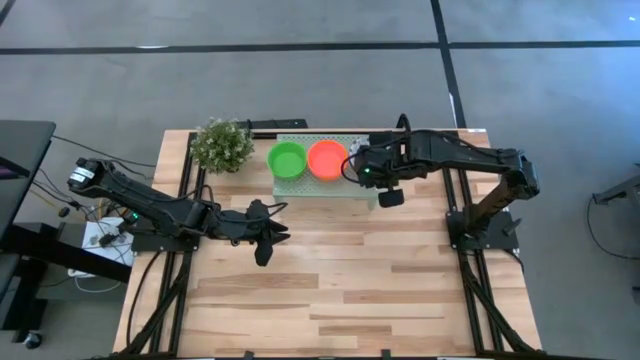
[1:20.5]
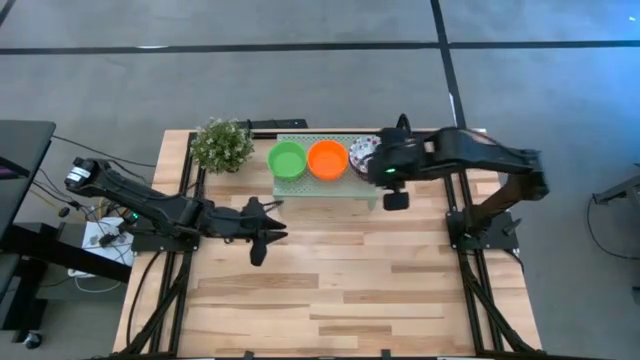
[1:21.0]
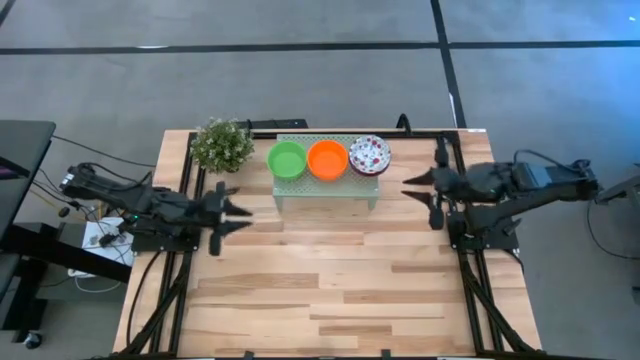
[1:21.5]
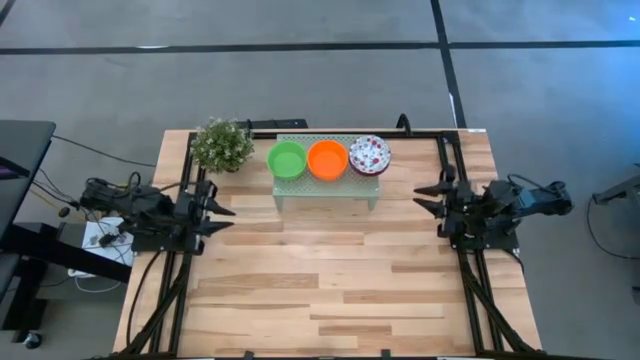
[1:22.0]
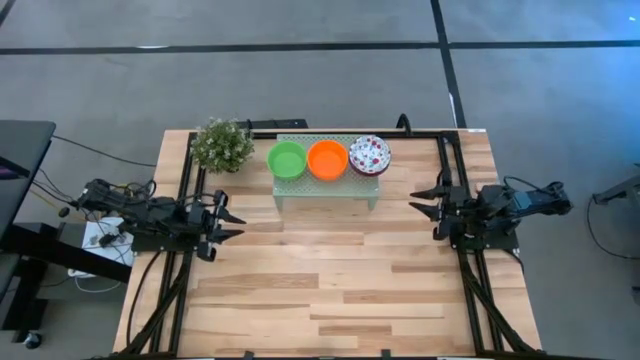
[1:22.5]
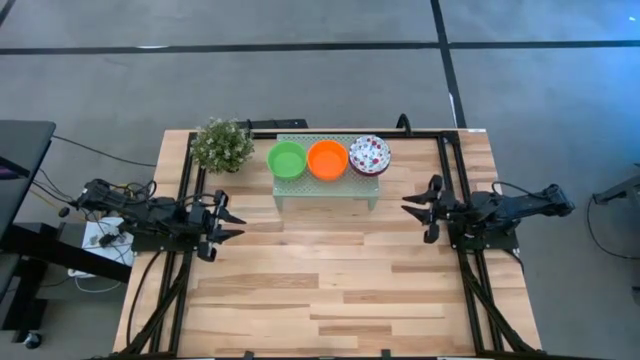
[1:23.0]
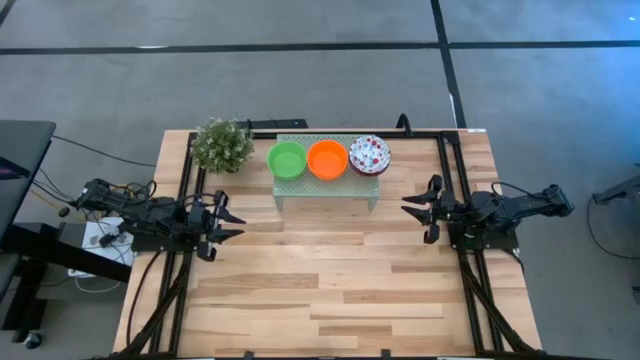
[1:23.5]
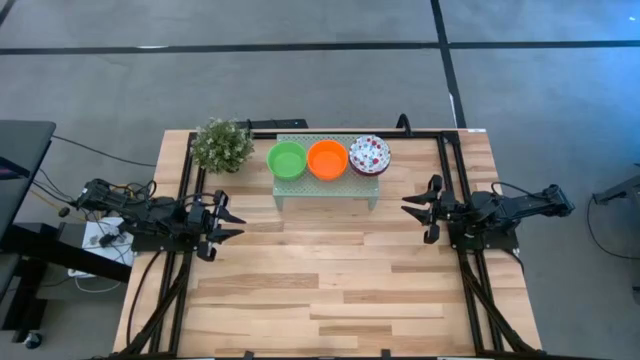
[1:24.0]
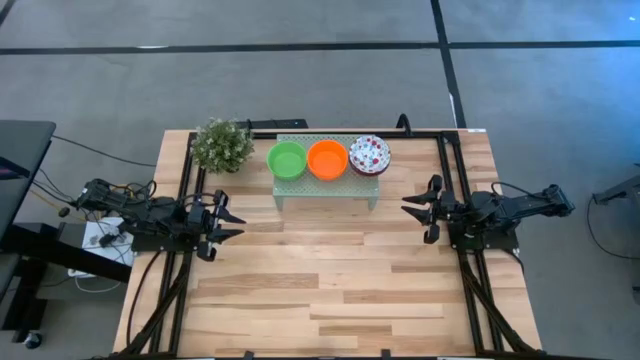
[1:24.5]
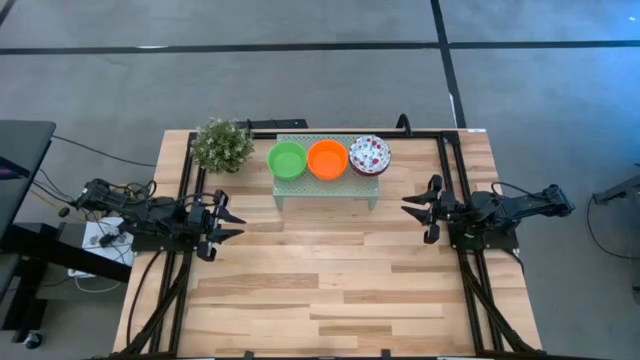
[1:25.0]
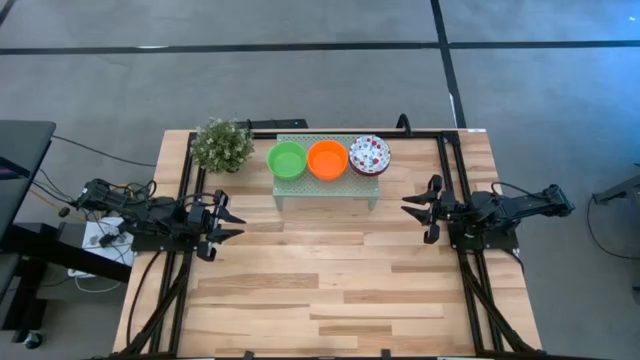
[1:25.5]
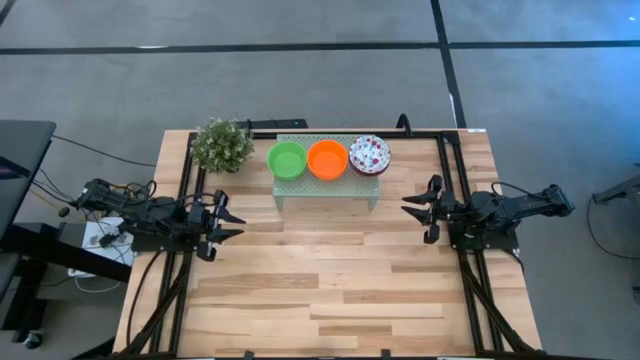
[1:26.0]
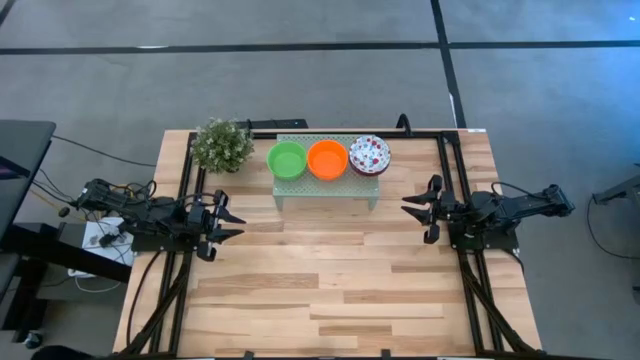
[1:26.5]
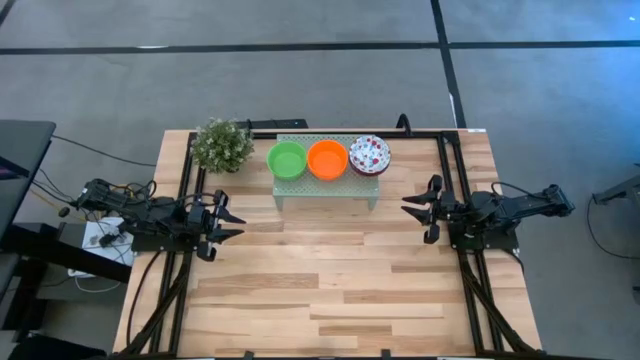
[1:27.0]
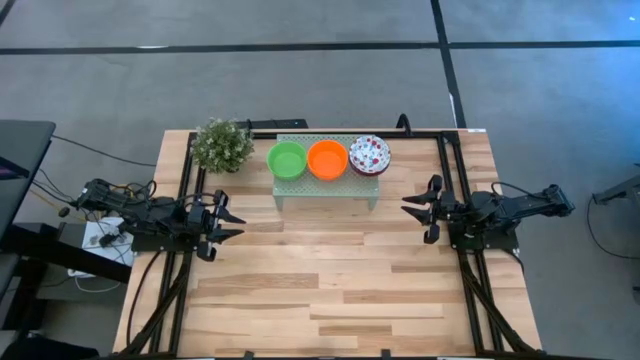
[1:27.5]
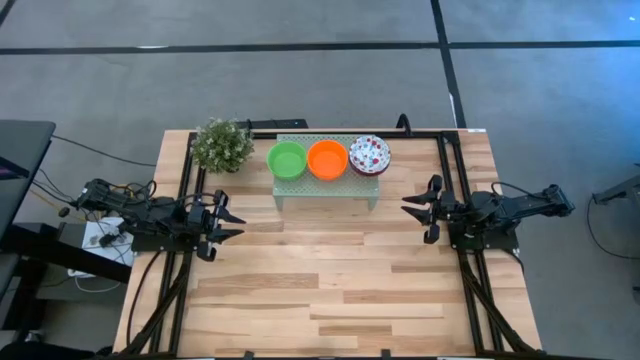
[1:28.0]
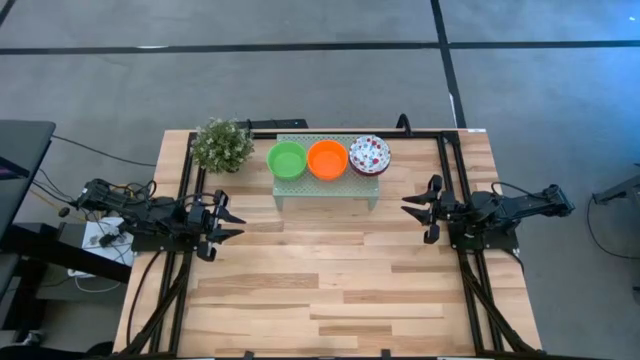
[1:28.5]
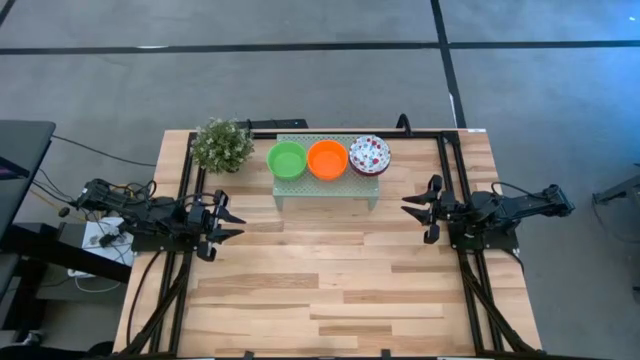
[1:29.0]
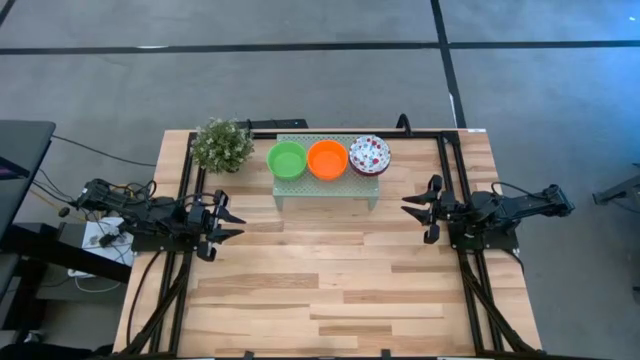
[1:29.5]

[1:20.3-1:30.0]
Task: Pick & Place Mini bowls
Return to Home Position

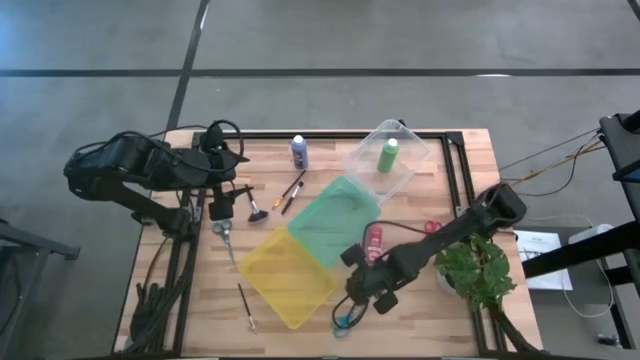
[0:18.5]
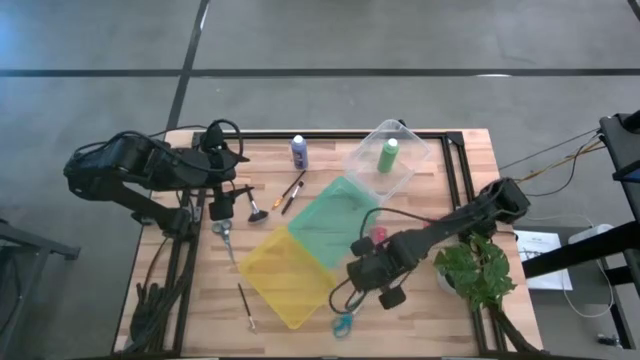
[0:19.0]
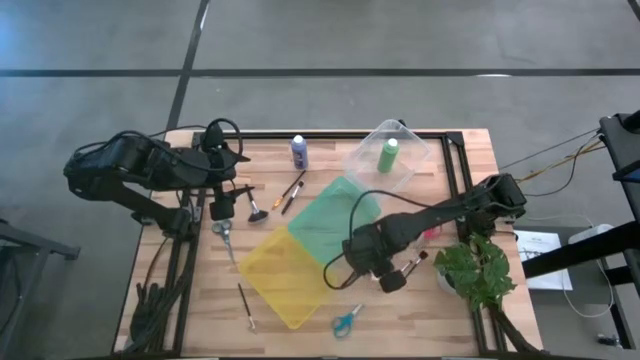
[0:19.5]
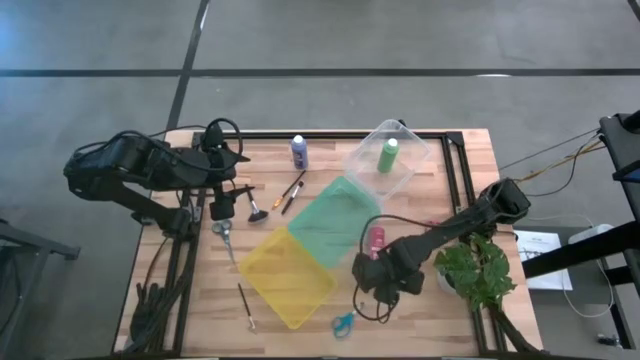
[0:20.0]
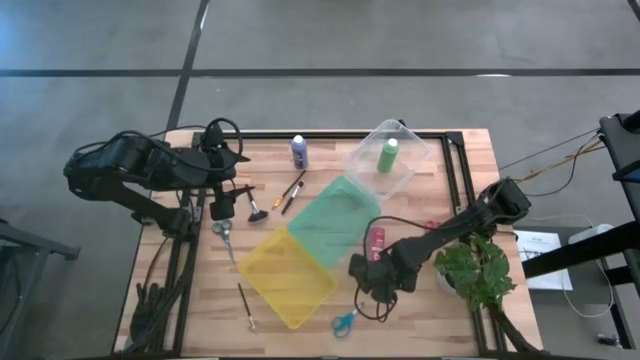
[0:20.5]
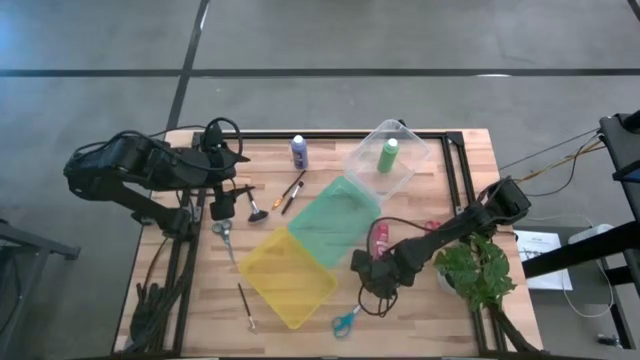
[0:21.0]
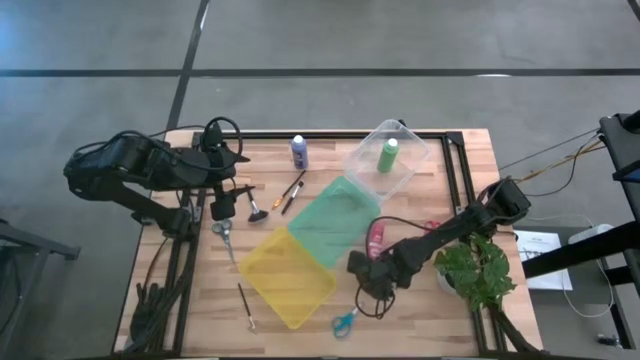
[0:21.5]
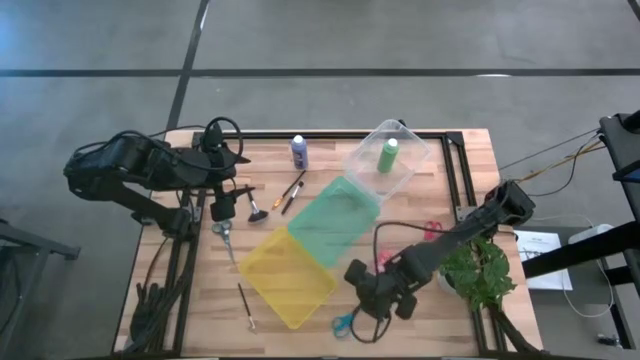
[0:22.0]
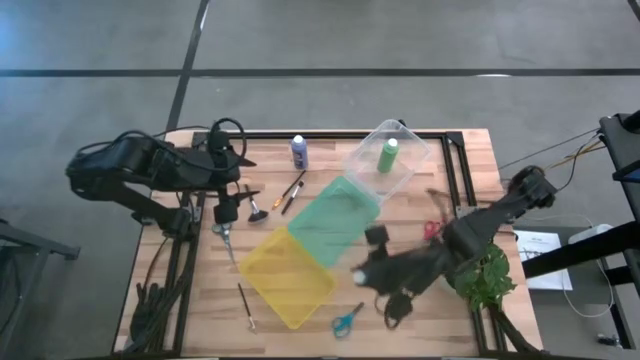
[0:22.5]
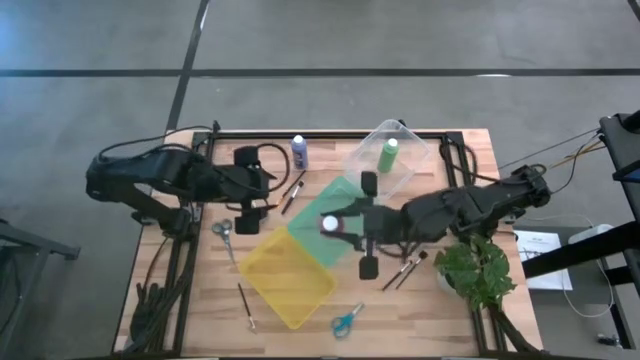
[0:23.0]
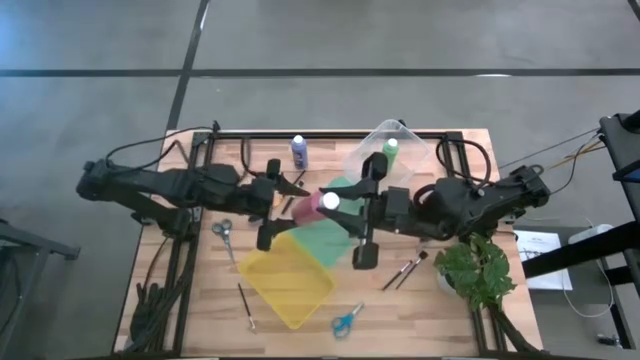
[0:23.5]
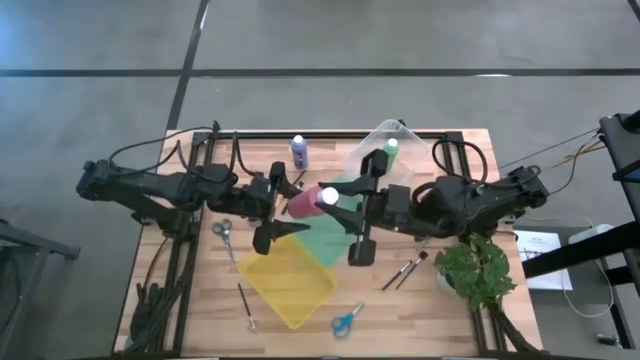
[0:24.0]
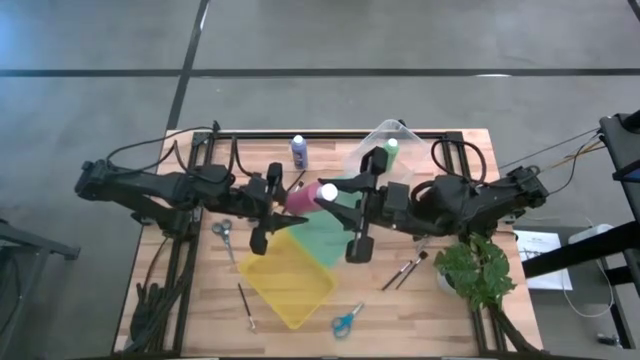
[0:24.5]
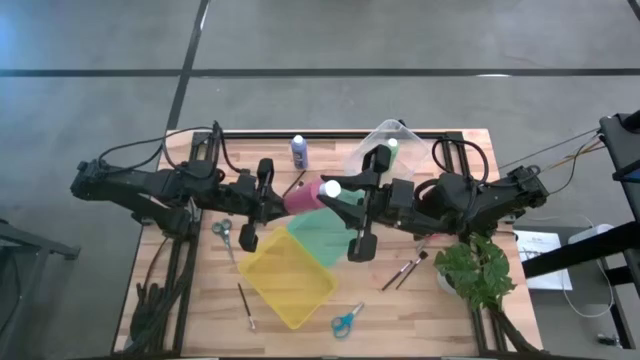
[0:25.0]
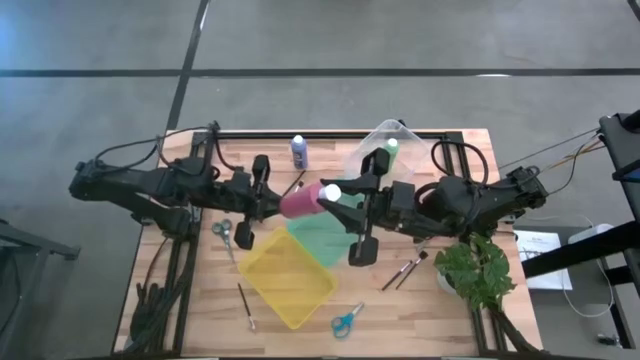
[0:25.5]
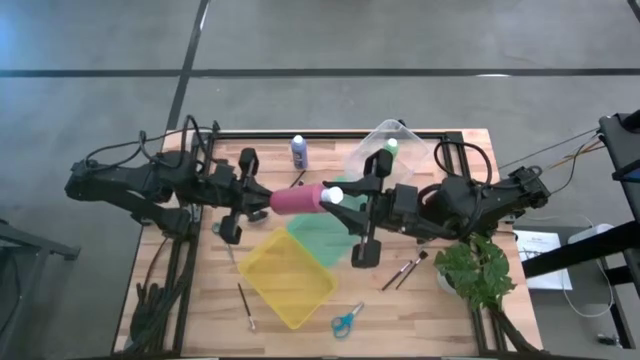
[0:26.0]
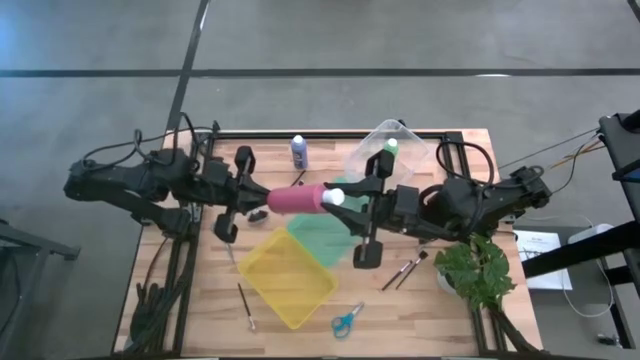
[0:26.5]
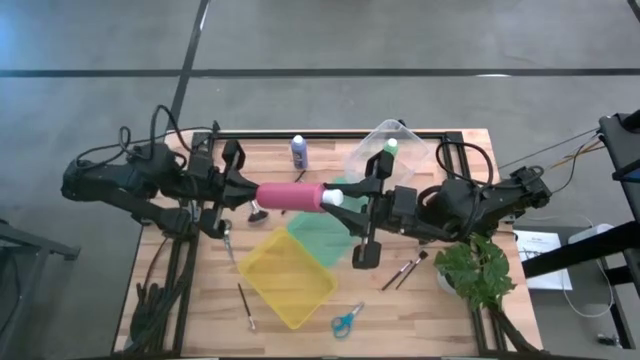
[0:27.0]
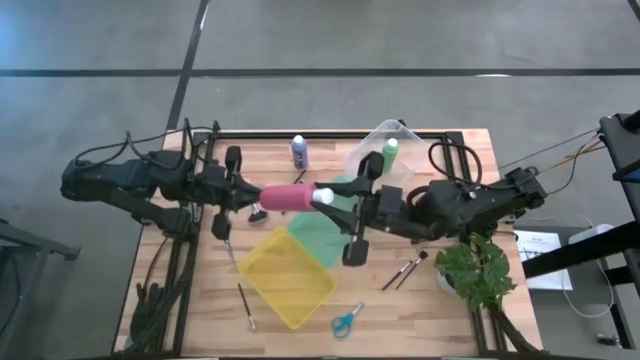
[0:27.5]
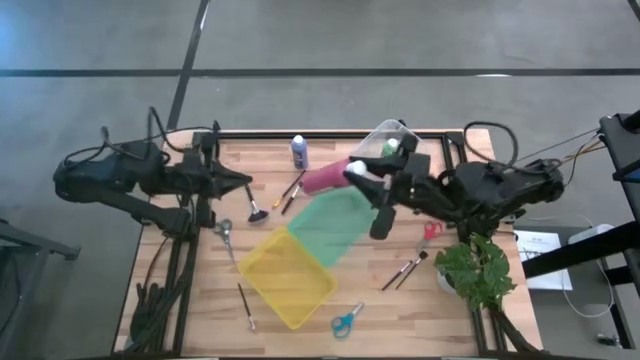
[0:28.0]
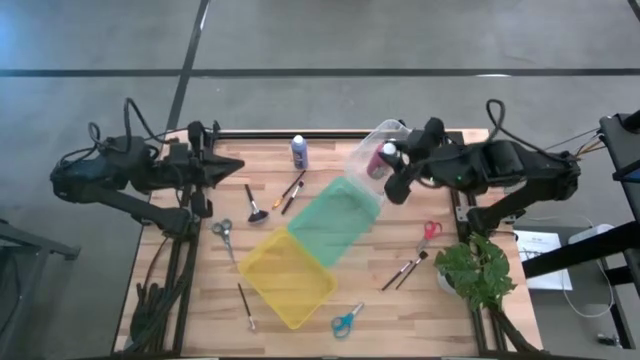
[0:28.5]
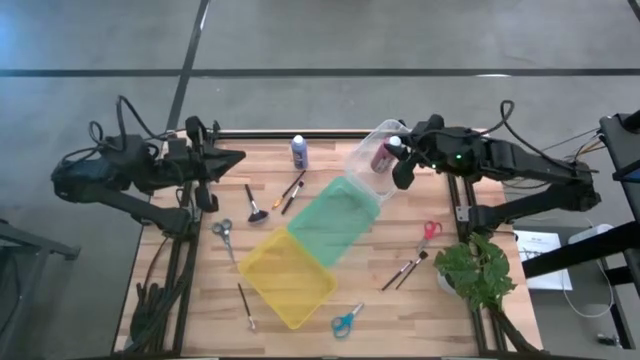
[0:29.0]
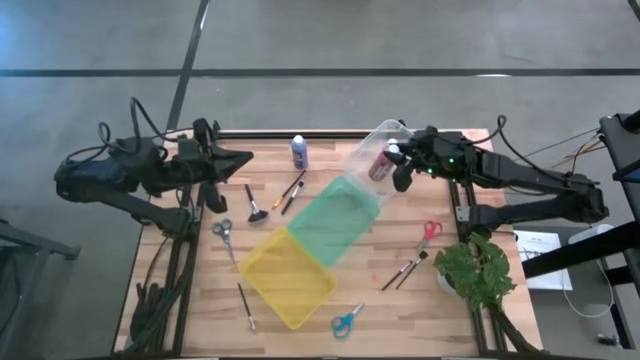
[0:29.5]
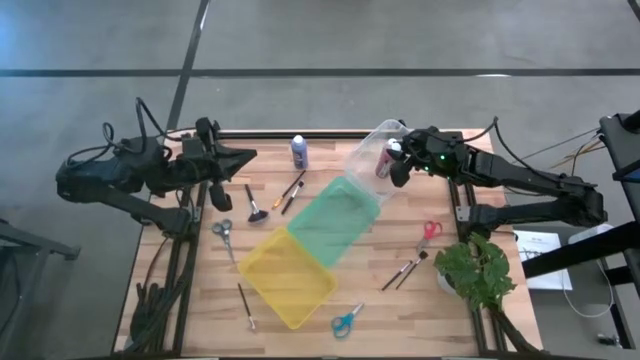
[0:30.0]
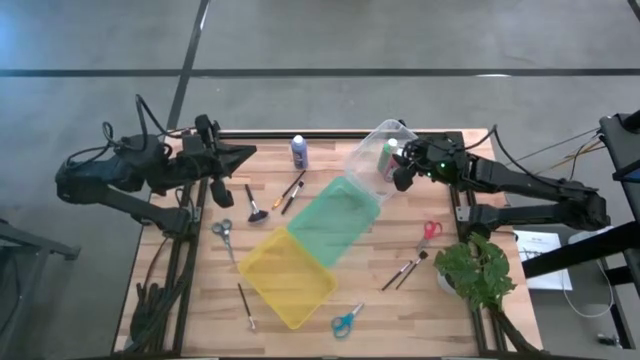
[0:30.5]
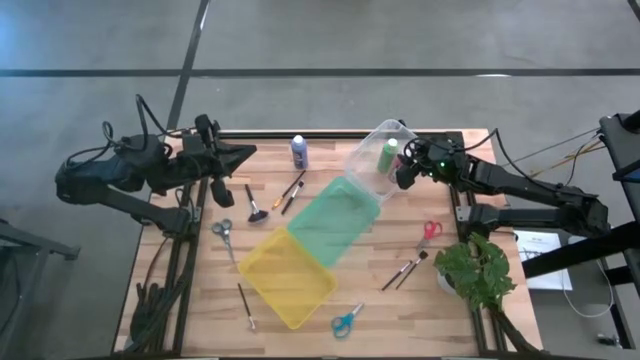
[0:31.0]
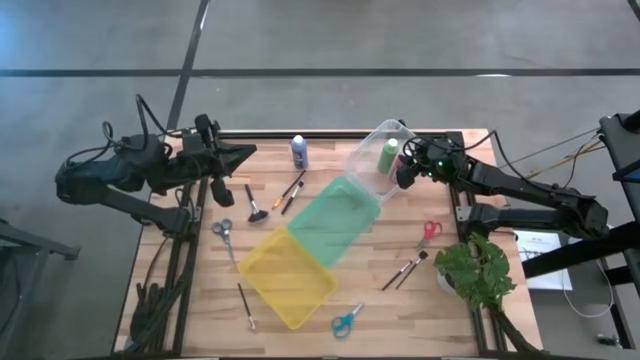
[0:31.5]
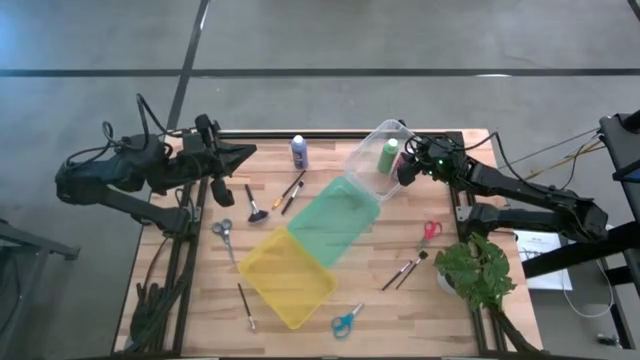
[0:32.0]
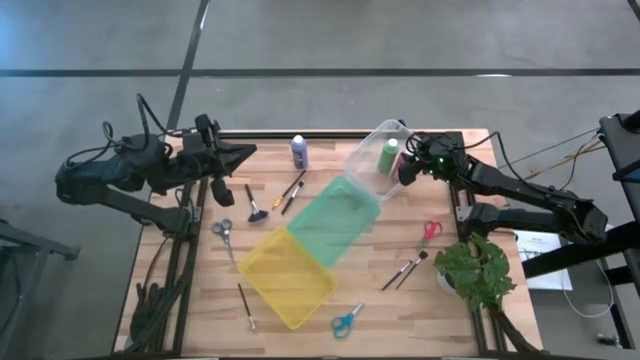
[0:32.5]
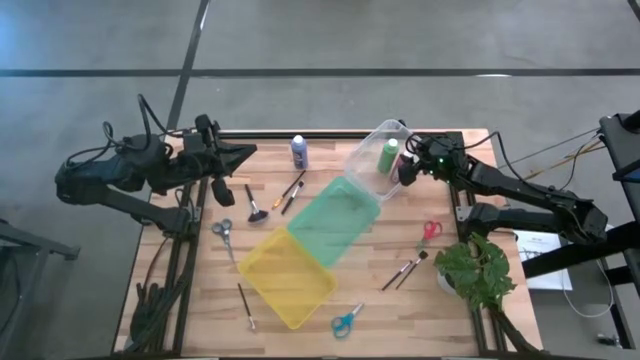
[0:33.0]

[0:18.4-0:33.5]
Task: Pick & Place Paint Supplies
Put the red paint bottle into the transparent bin
